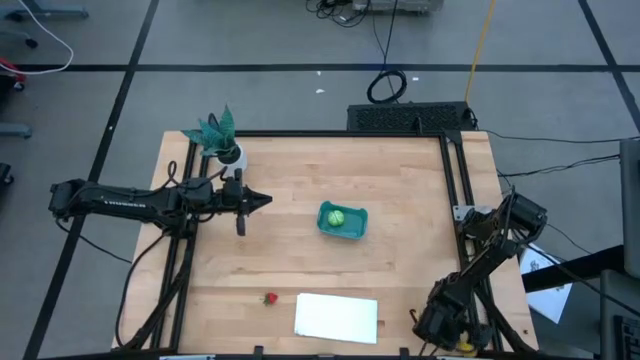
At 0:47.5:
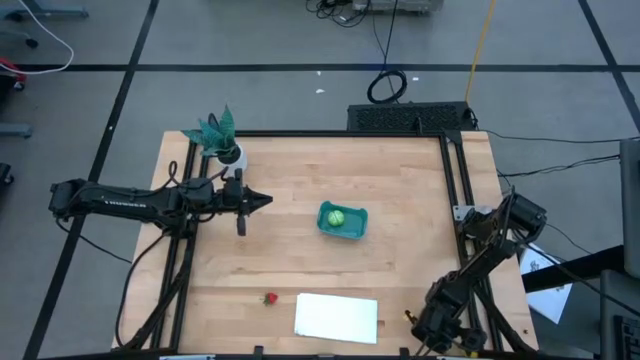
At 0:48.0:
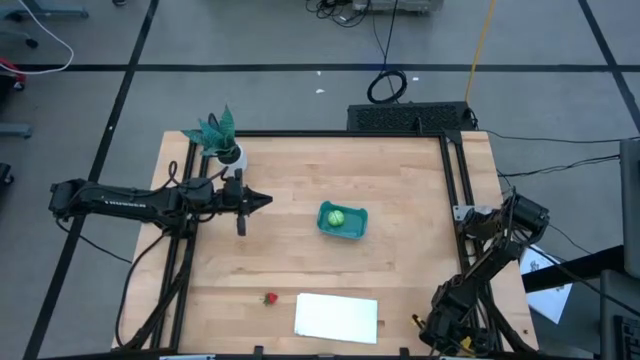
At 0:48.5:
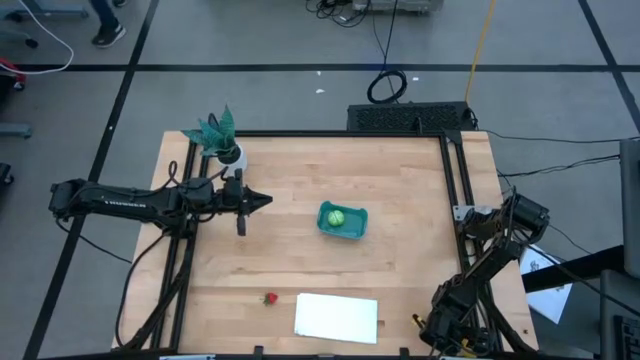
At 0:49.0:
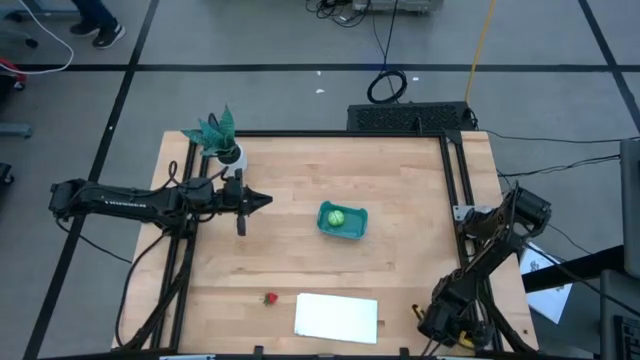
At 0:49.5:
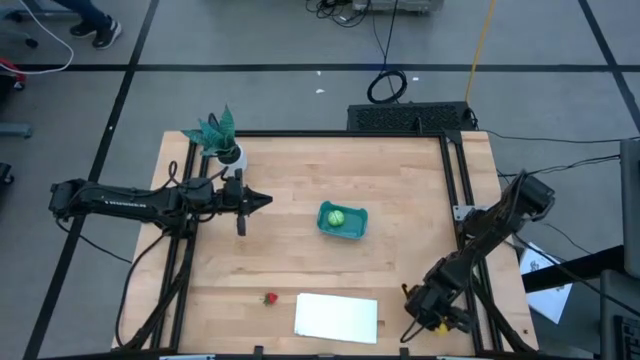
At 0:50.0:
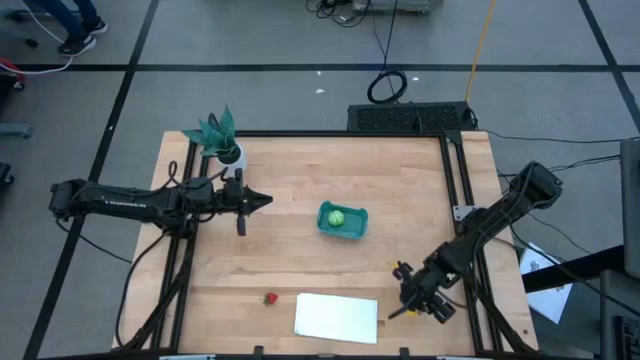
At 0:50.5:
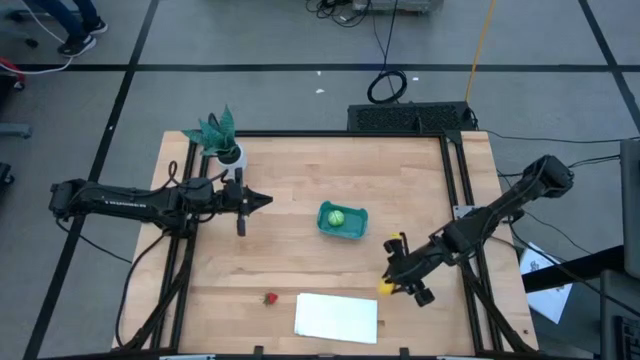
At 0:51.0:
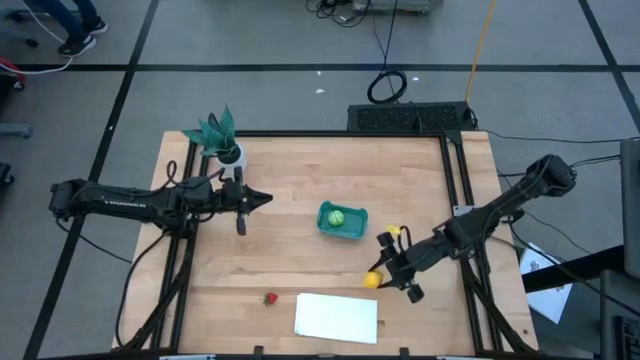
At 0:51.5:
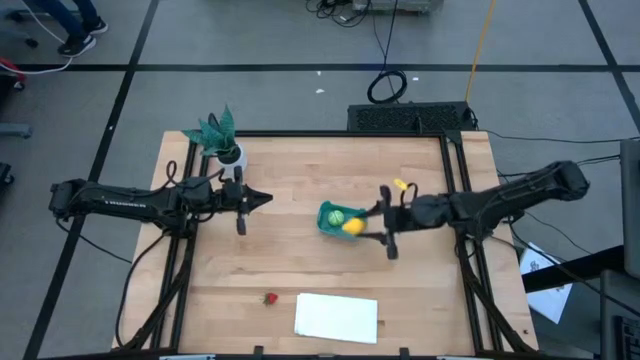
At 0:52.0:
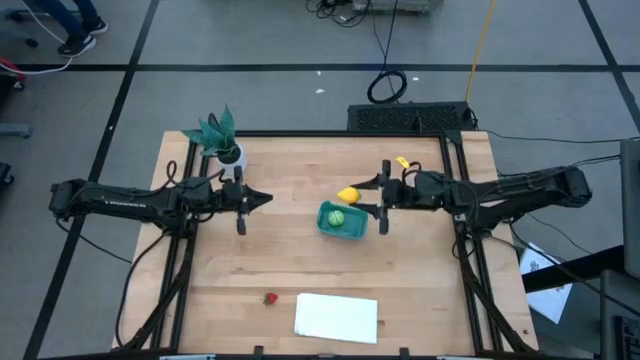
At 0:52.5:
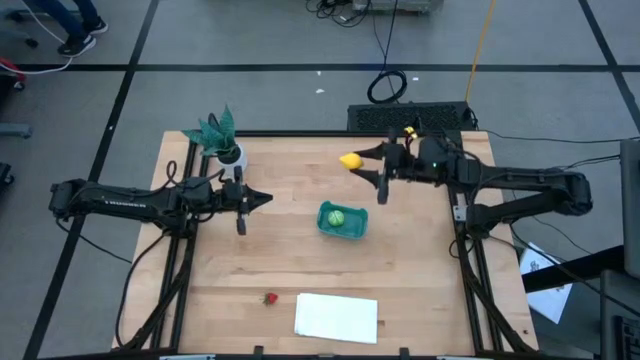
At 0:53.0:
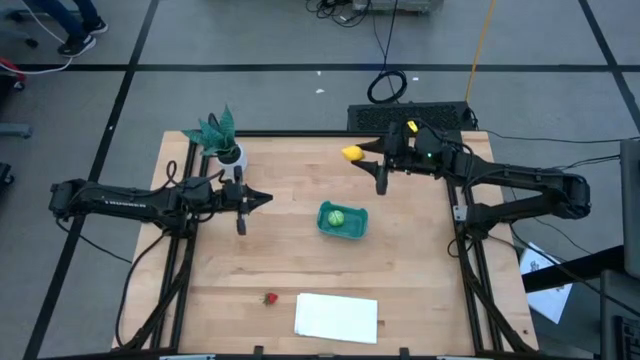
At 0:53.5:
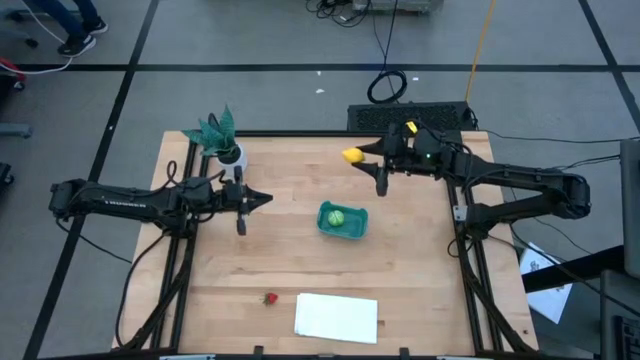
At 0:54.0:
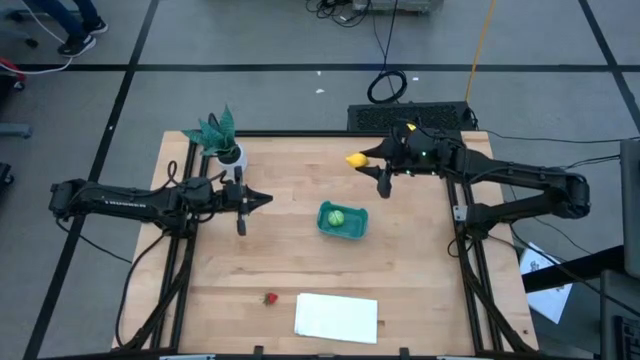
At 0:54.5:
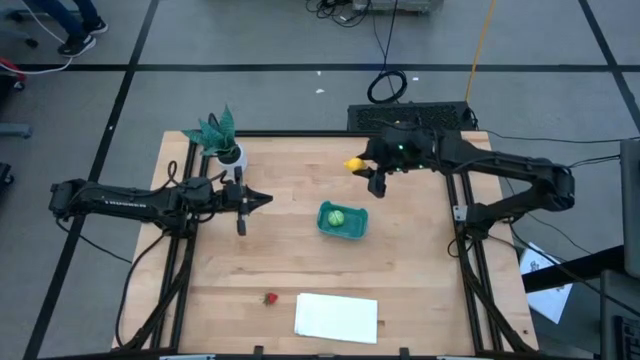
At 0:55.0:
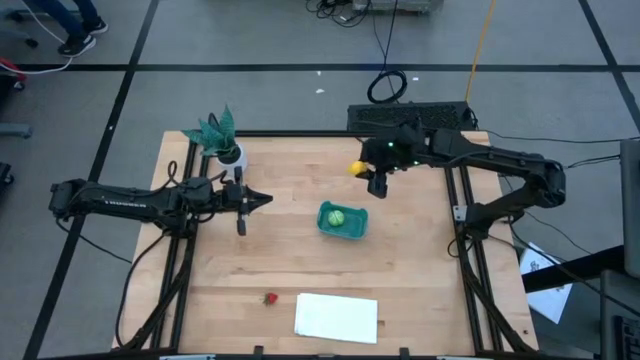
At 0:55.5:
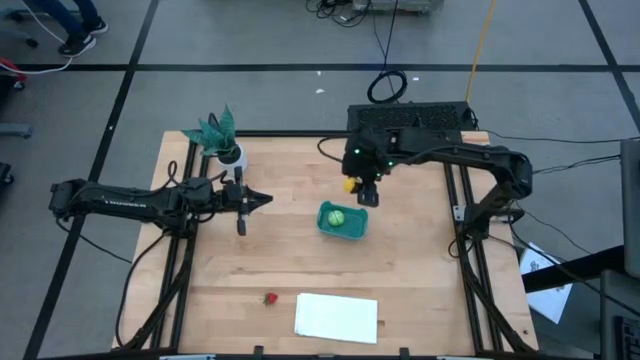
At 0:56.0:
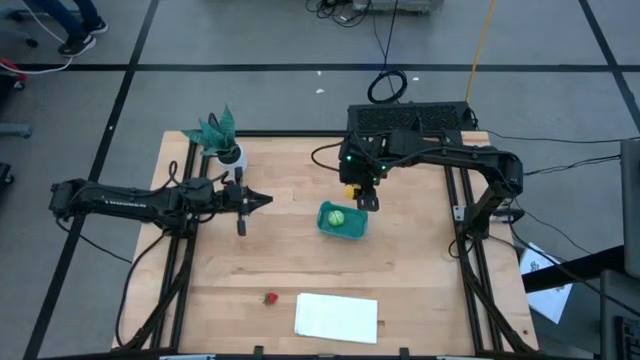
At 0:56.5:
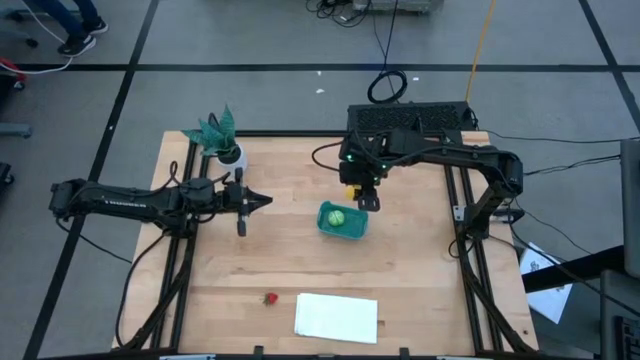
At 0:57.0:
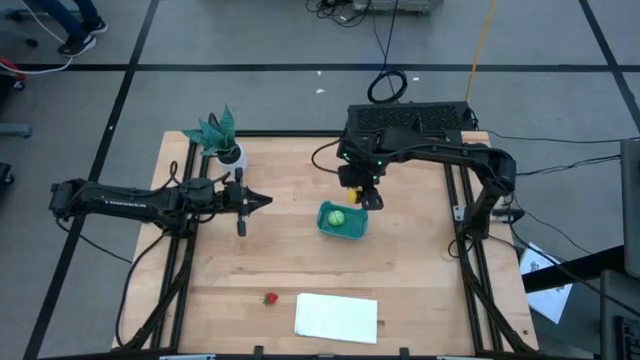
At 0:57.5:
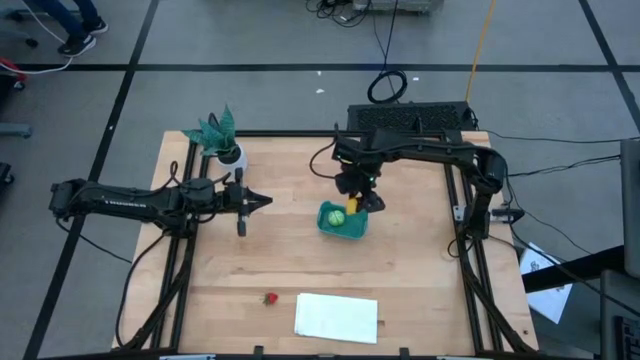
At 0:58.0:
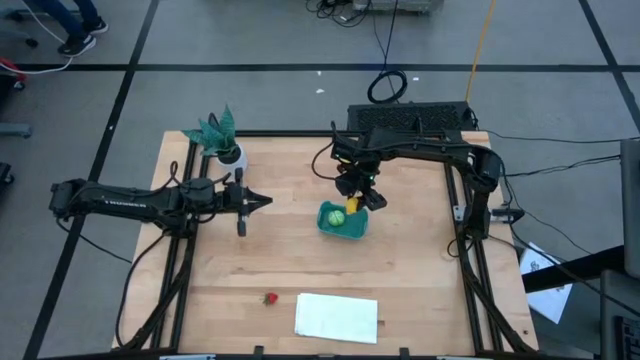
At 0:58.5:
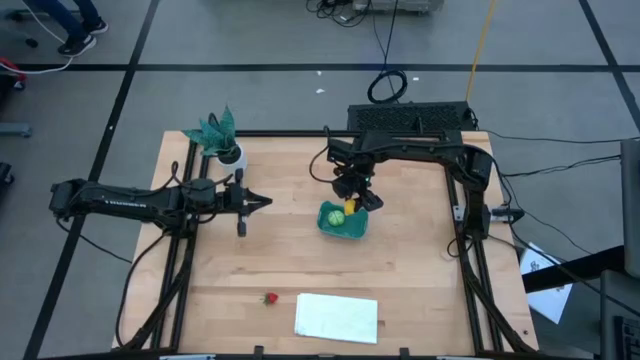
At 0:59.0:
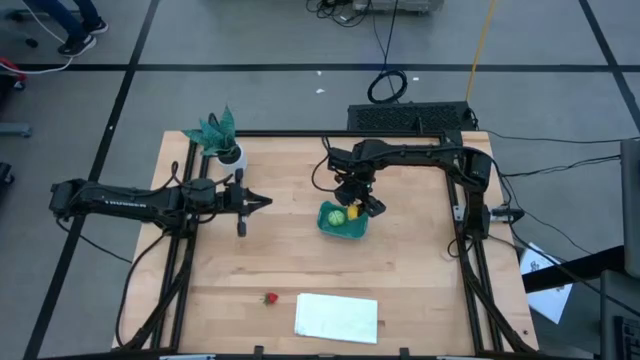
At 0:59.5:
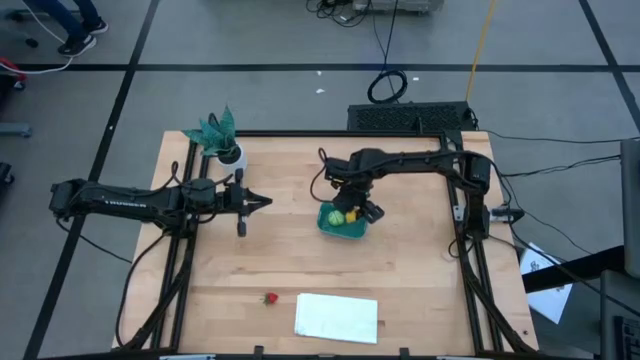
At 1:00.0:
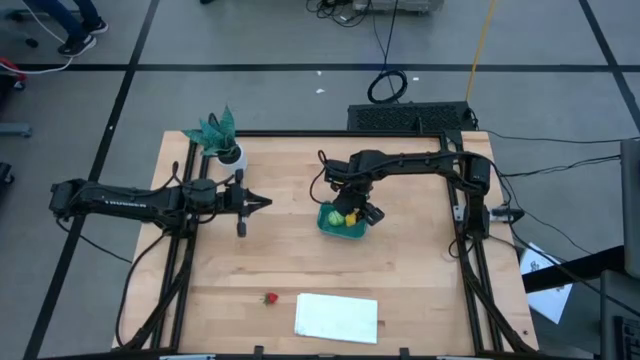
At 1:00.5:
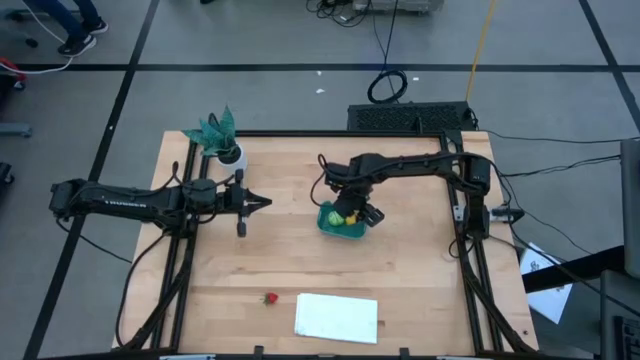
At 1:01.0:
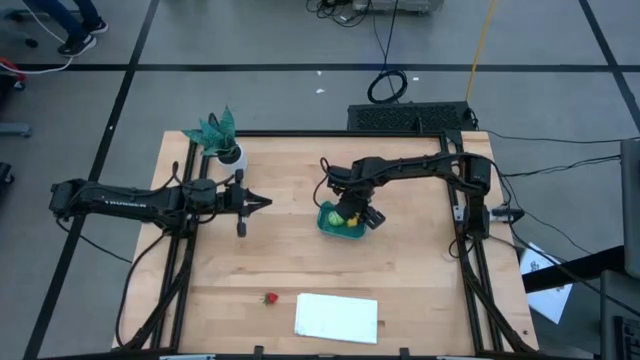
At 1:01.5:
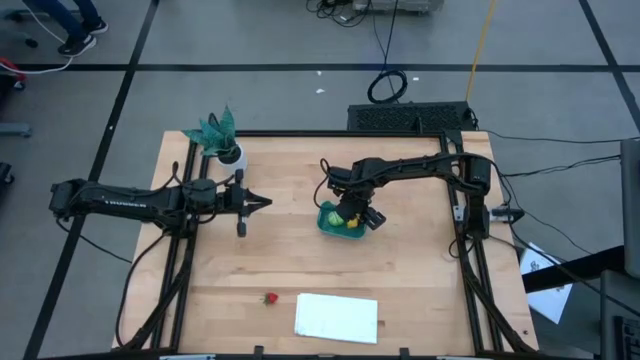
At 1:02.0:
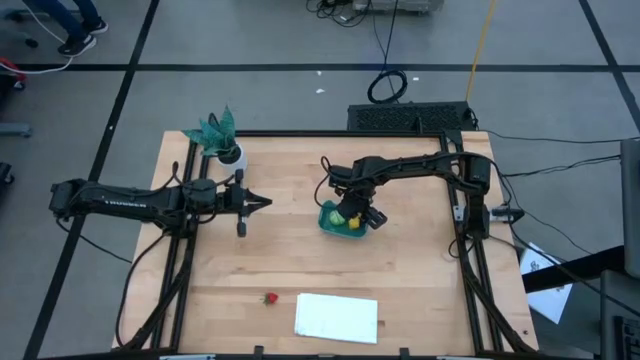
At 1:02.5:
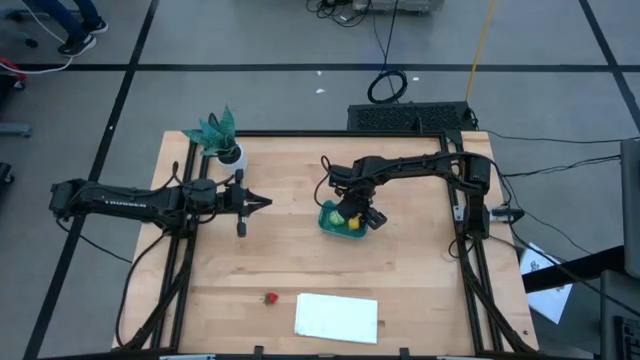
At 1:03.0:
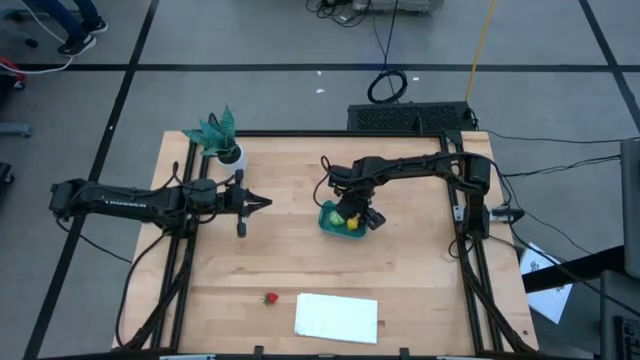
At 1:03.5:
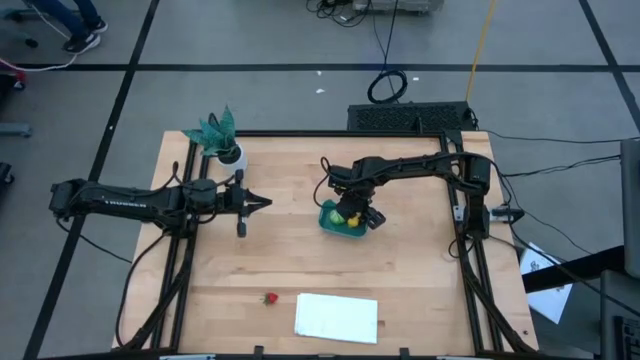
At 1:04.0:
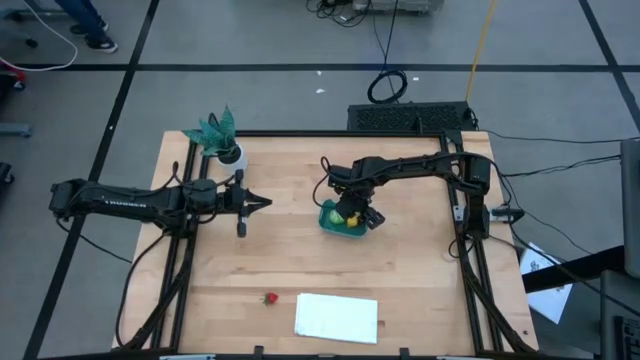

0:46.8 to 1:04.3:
Task: Pick and placing Produce into tupperware
Put the lemon into the bin

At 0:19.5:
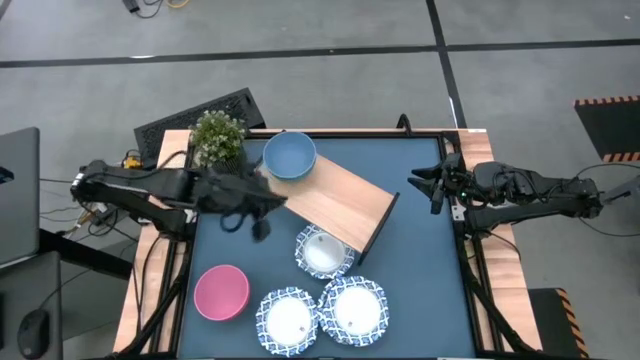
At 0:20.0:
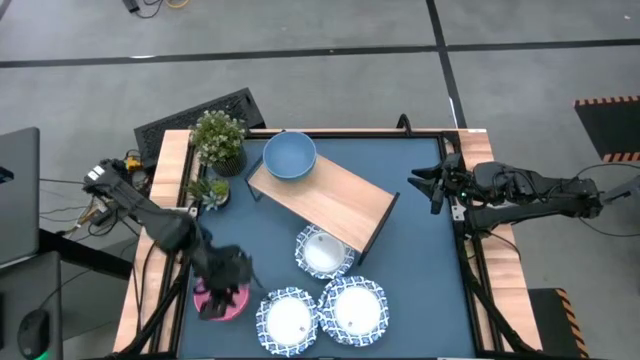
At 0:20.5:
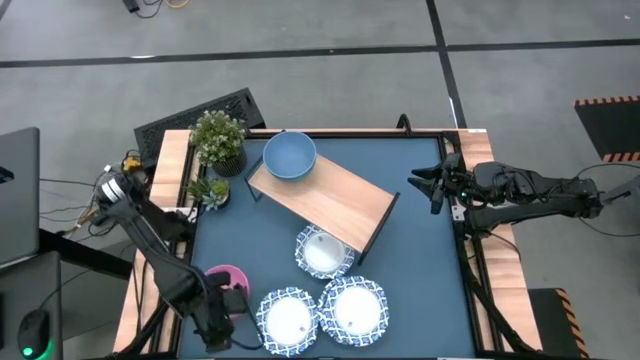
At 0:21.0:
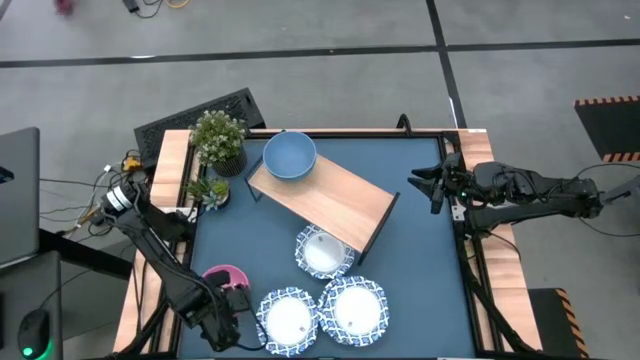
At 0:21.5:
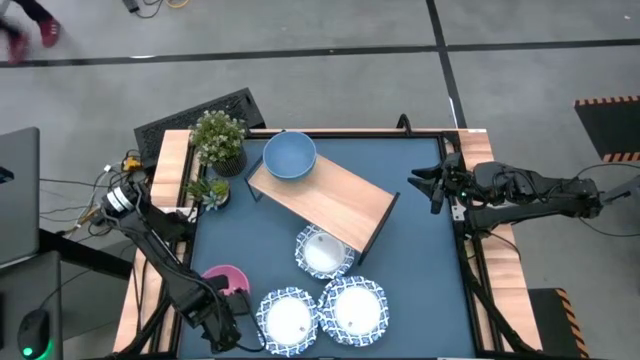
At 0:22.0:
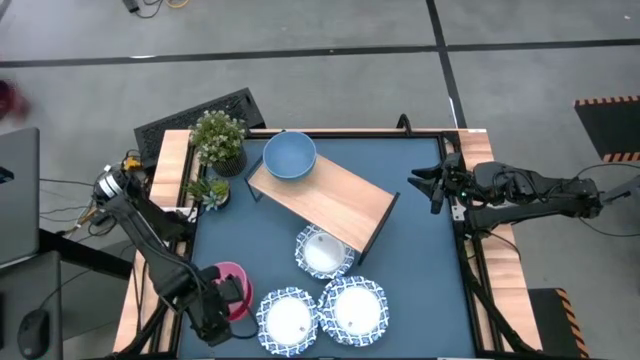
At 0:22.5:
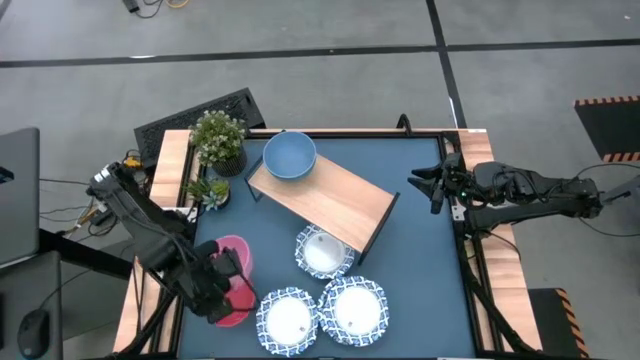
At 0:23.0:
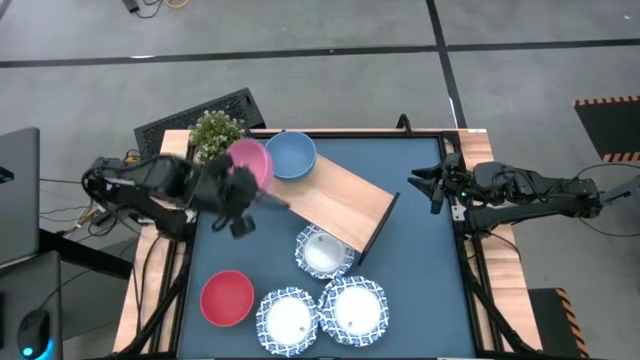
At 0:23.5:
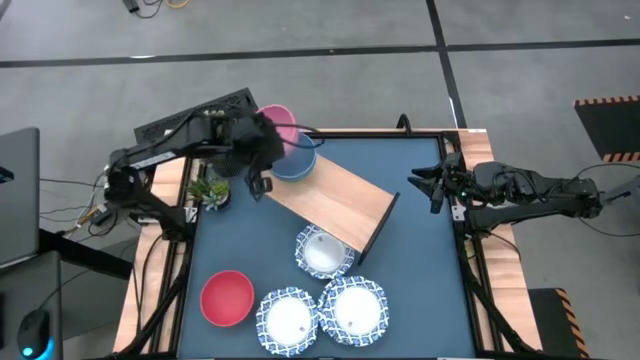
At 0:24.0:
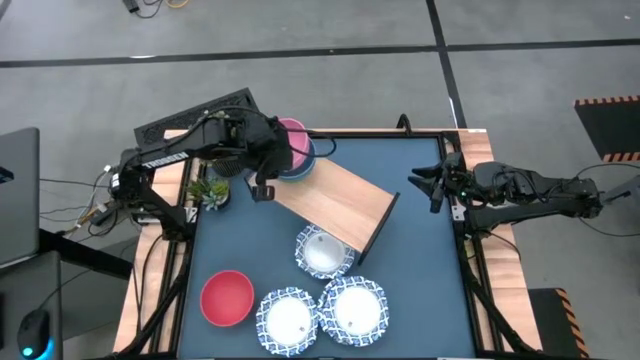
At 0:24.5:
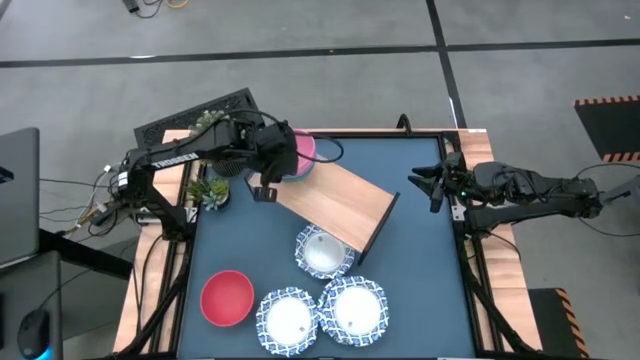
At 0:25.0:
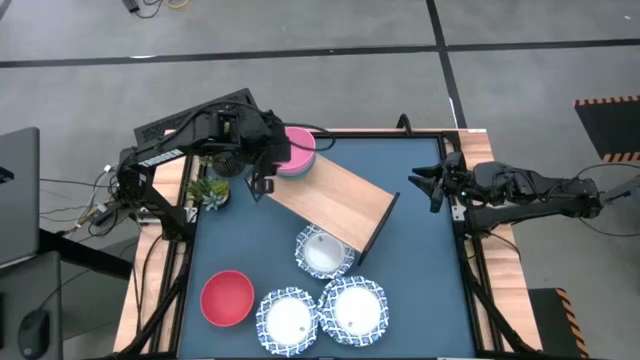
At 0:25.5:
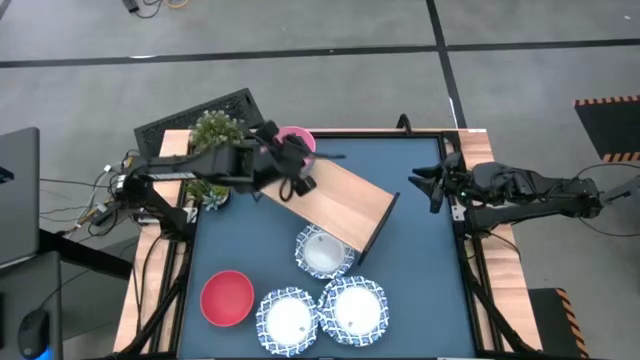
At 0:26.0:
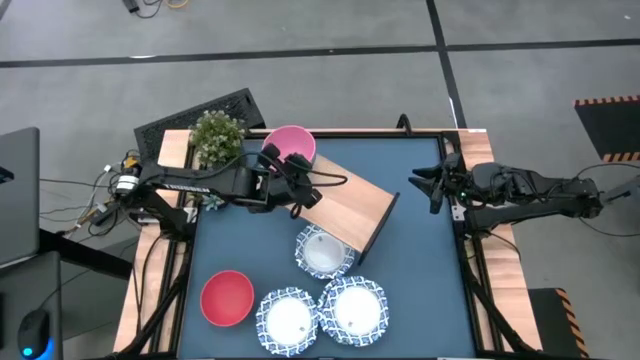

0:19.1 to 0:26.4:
Task: Place and stack bowls onto a shelf
Stack the pink bowl onto the blue bowl on the shelf
